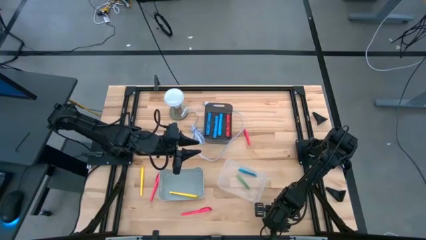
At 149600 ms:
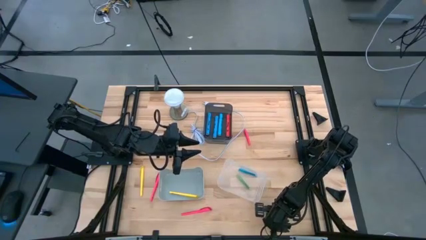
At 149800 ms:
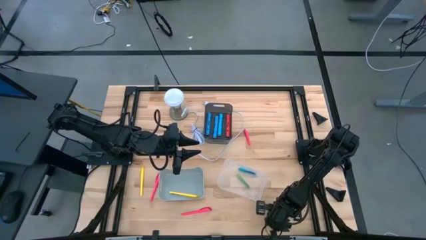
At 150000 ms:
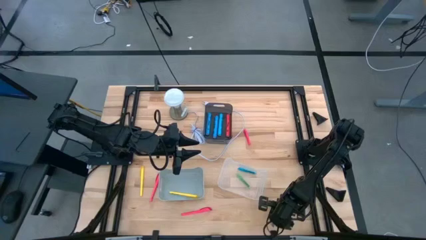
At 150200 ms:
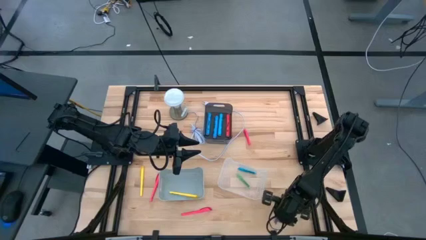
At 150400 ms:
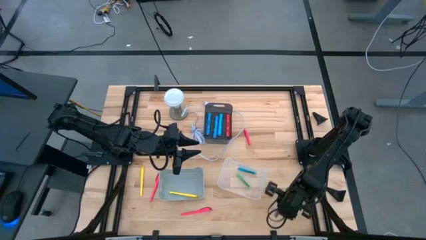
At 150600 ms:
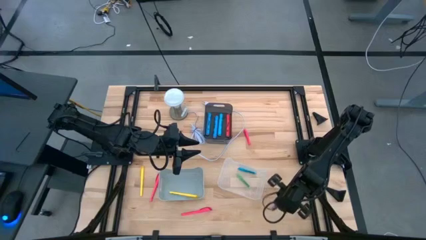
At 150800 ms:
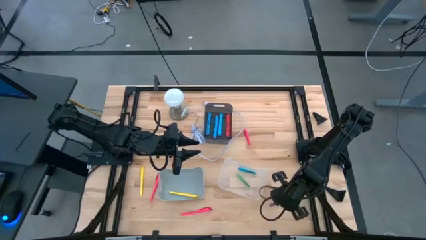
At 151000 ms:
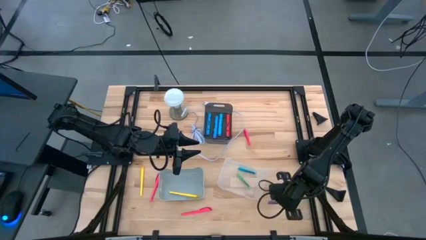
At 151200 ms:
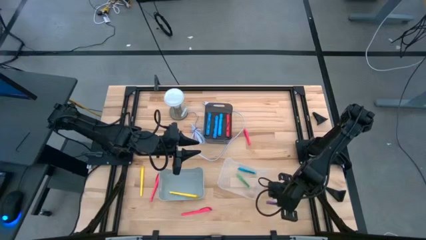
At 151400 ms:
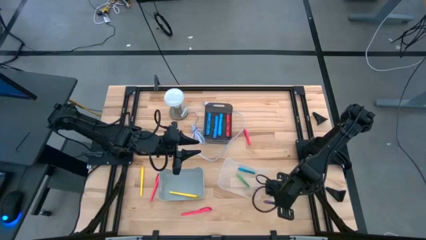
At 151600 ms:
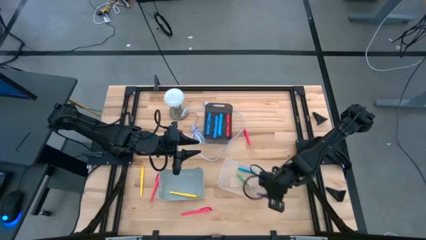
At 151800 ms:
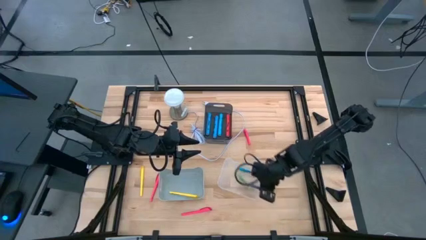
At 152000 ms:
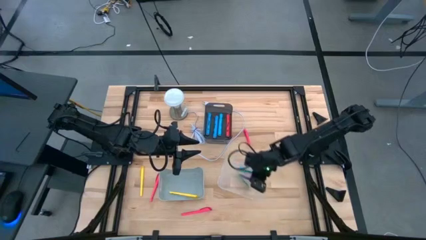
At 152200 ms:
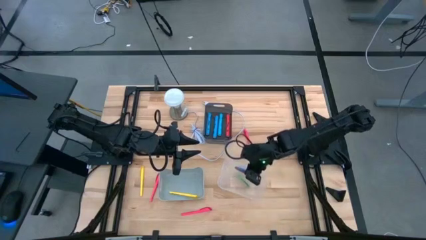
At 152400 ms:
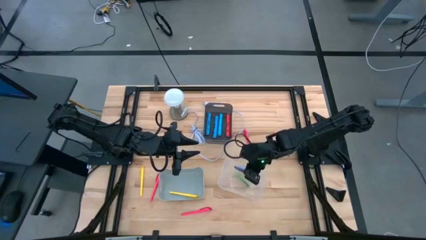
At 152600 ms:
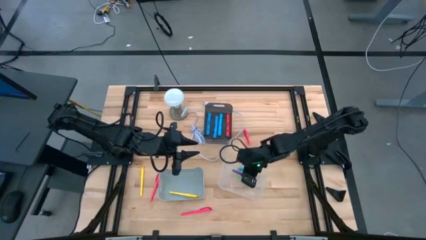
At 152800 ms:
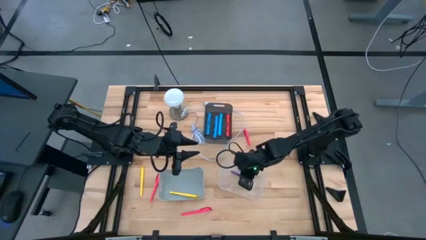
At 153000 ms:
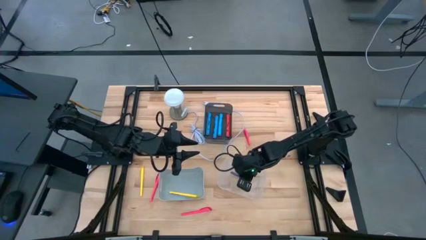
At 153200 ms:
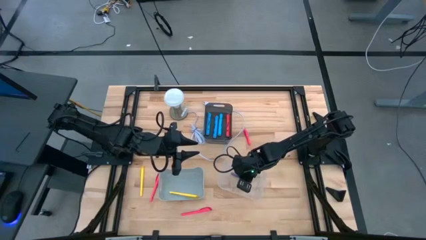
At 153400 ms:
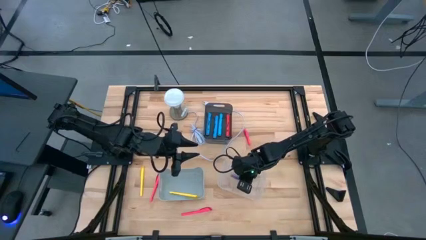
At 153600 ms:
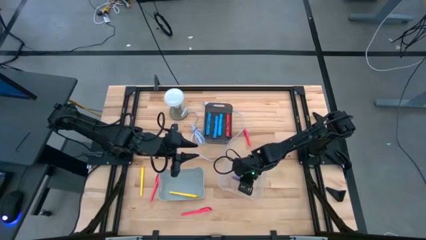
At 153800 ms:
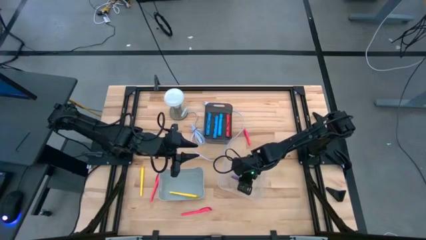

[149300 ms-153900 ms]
Task: Pick & Place Markers
Put the purple pen into the transparent bin

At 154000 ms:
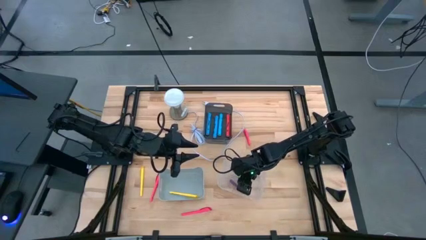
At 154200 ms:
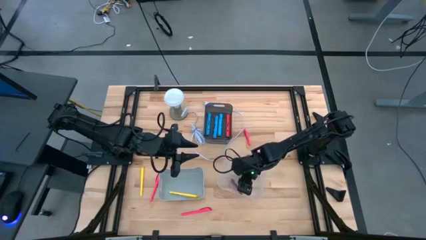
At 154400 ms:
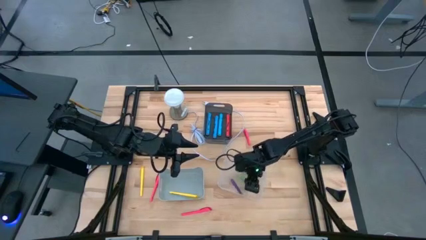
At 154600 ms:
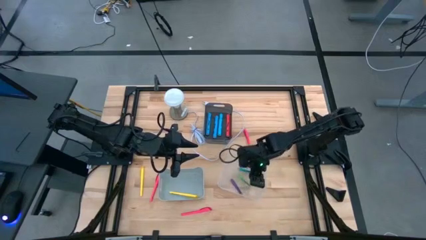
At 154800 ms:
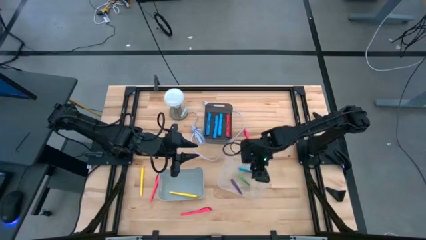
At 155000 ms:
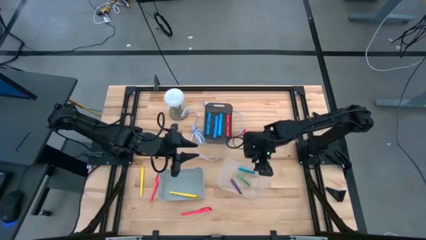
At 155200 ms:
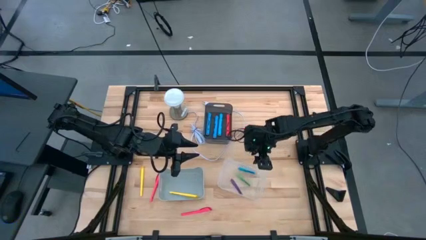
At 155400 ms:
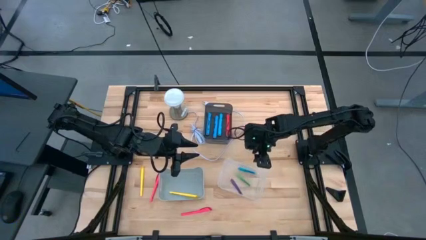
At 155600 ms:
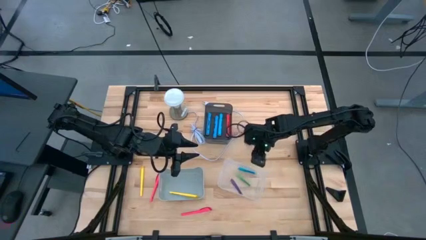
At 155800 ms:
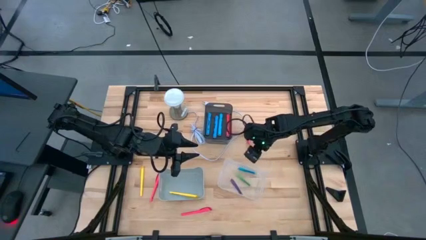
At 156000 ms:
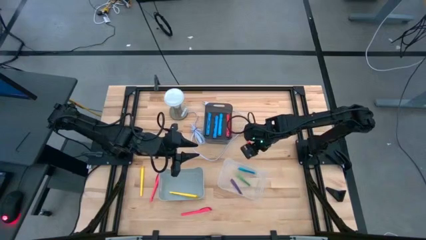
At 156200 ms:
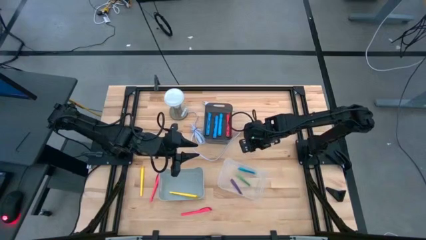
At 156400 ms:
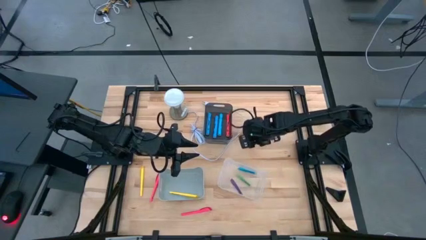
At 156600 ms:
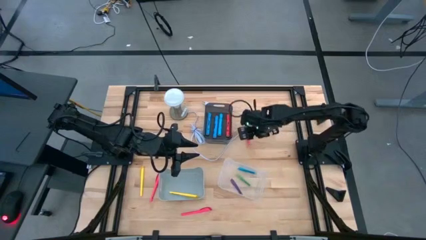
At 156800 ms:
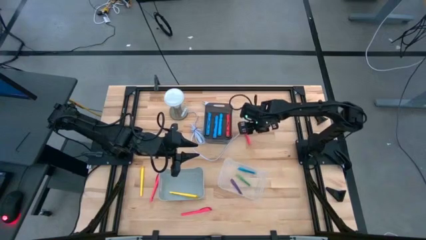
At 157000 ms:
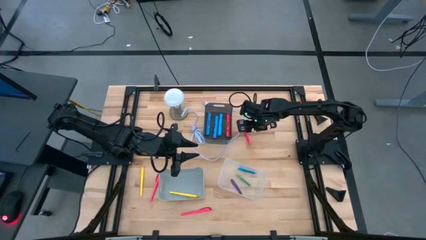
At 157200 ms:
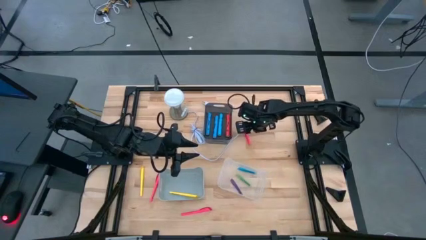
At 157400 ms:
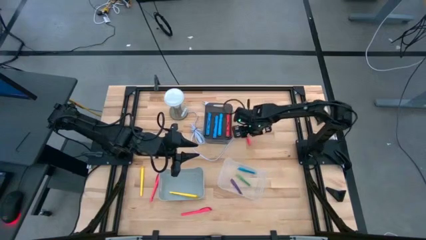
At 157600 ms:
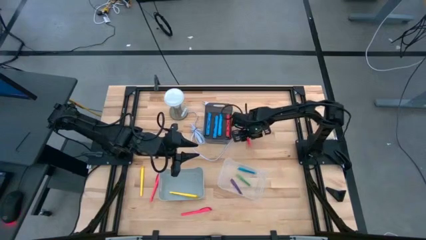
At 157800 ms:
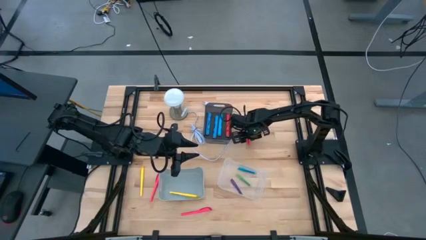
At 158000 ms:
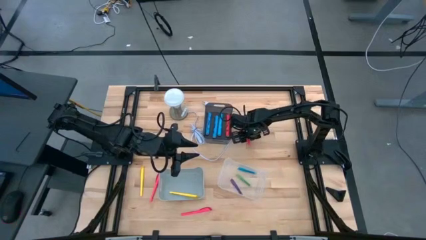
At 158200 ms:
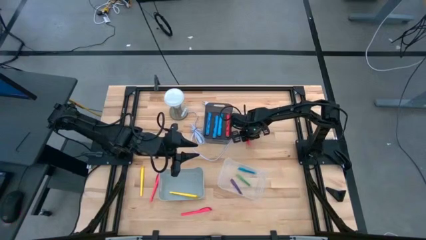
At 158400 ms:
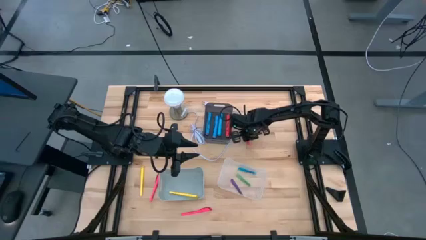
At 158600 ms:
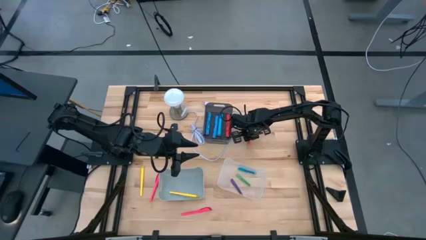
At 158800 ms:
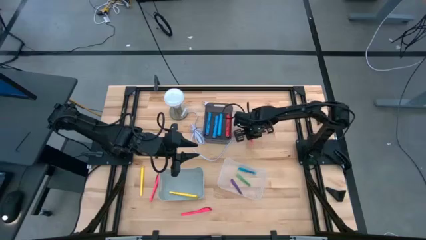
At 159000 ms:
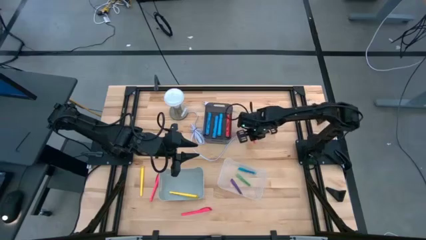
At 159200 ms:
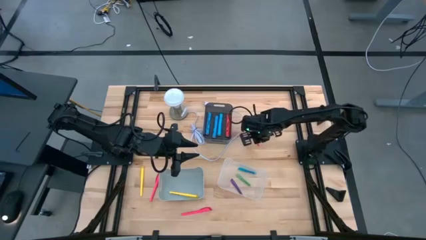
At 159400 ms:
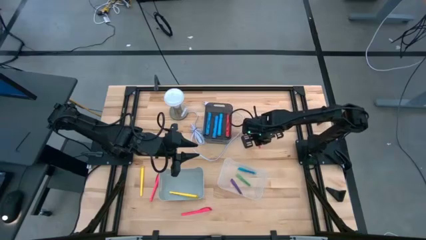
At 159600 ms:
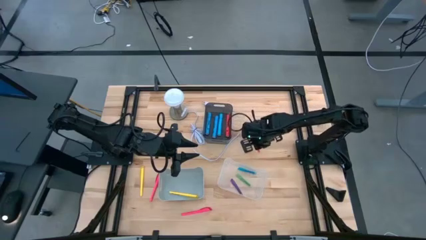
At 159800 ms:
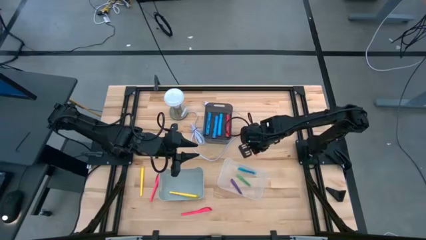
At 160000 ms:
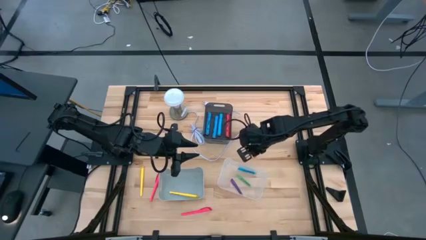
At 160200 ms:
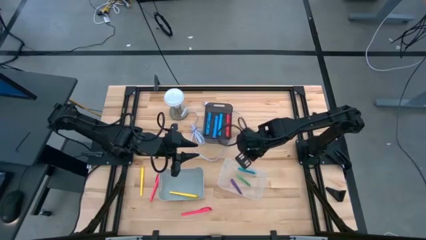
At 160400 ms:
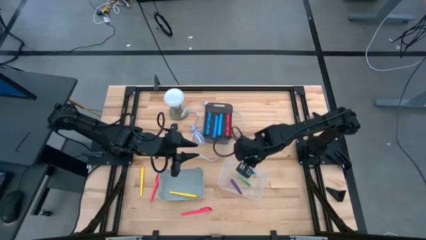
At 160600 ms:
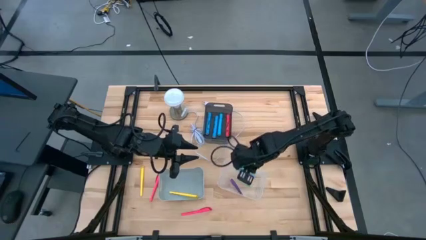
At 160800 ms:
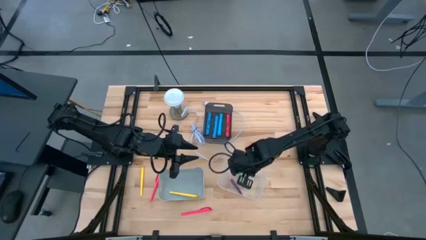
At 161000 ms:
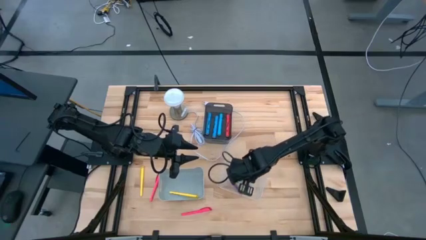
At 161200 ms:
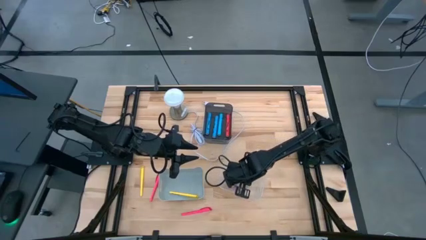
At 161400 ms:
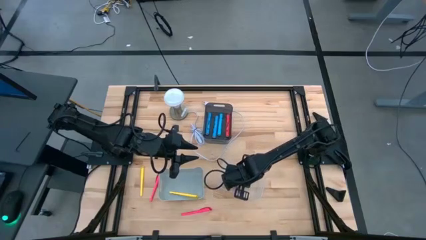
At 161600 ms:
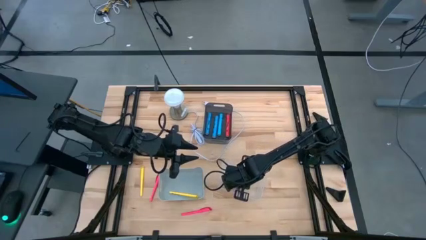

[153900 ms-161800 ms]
Put the pink pen into the transparent bin

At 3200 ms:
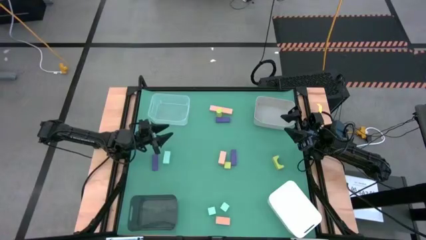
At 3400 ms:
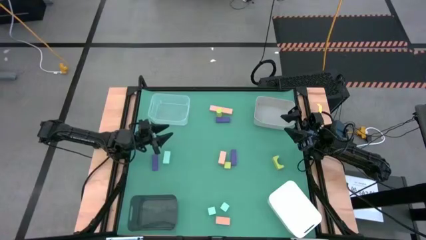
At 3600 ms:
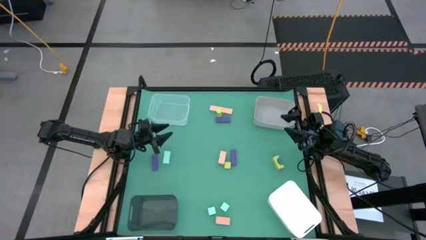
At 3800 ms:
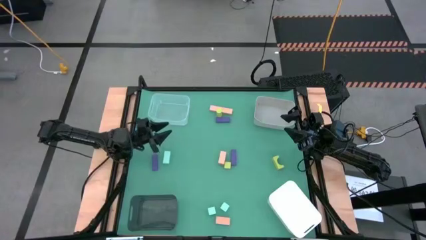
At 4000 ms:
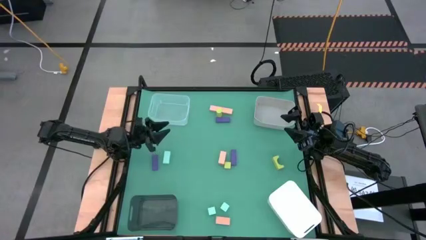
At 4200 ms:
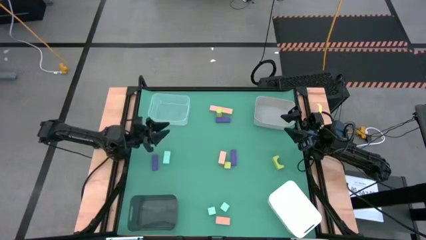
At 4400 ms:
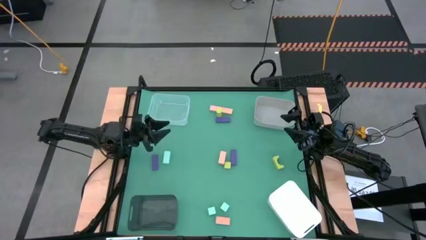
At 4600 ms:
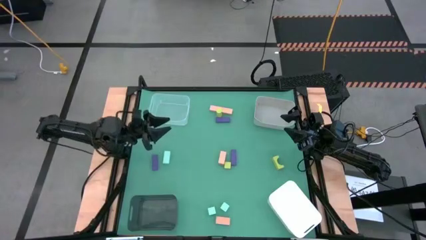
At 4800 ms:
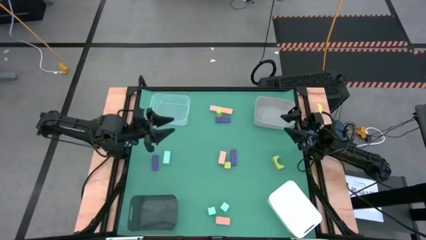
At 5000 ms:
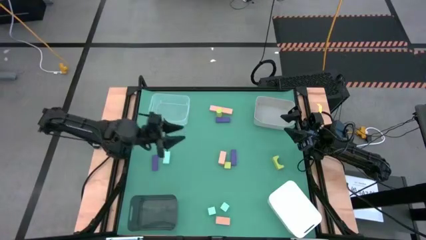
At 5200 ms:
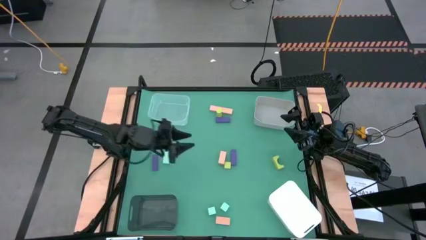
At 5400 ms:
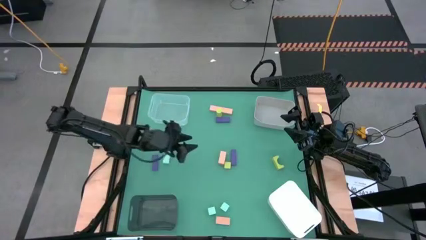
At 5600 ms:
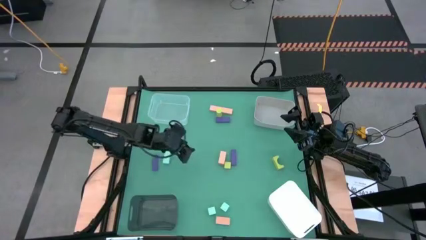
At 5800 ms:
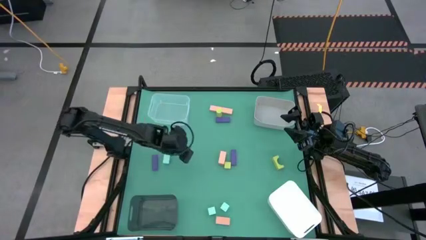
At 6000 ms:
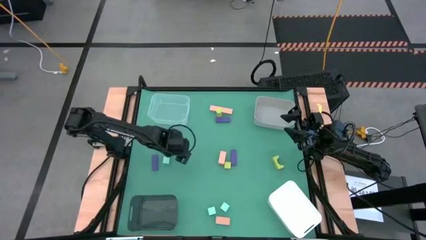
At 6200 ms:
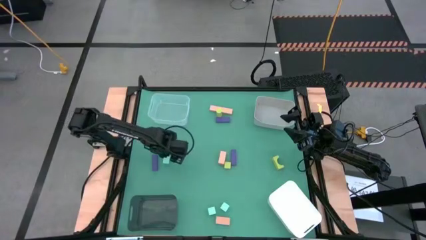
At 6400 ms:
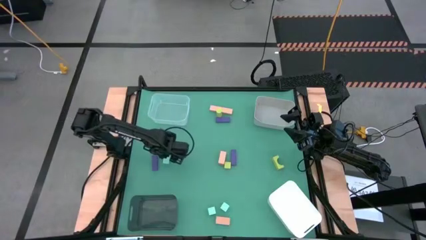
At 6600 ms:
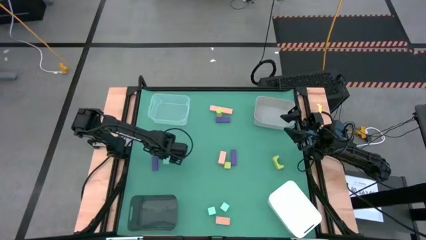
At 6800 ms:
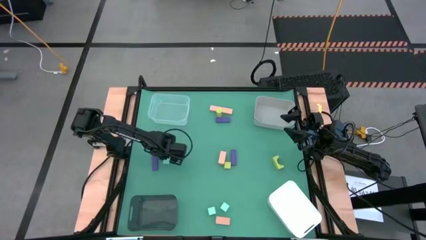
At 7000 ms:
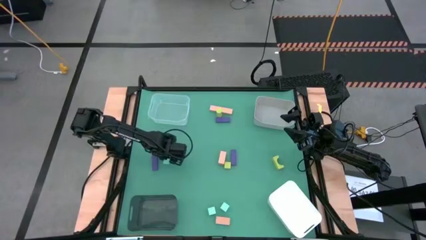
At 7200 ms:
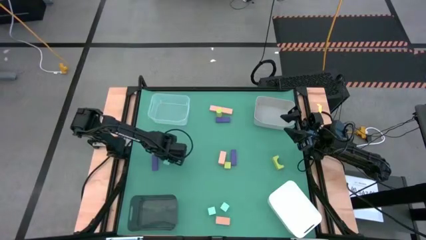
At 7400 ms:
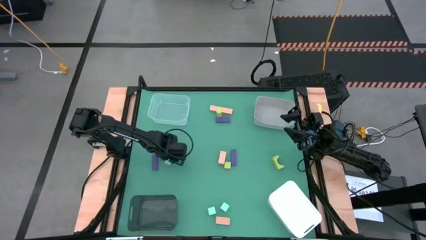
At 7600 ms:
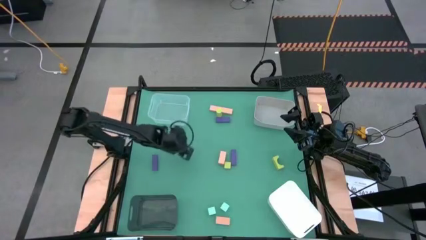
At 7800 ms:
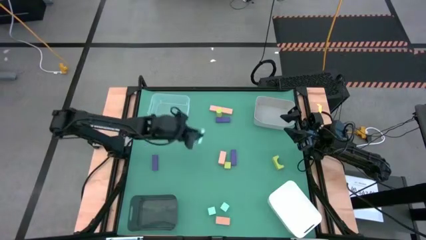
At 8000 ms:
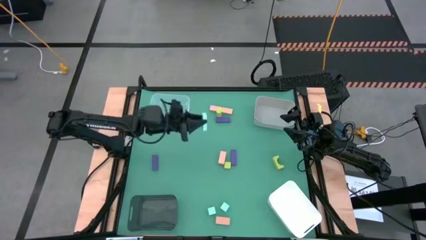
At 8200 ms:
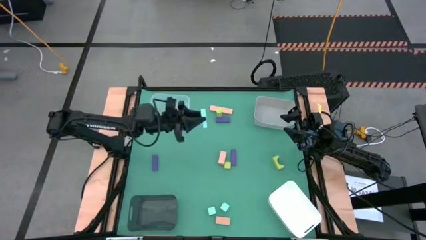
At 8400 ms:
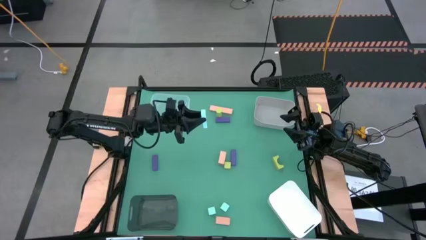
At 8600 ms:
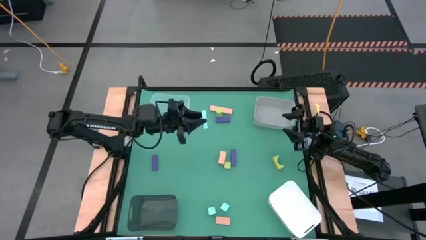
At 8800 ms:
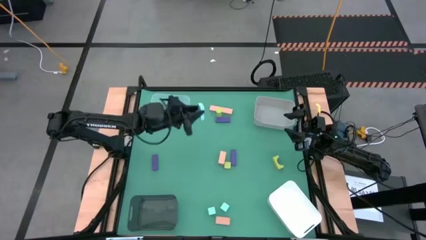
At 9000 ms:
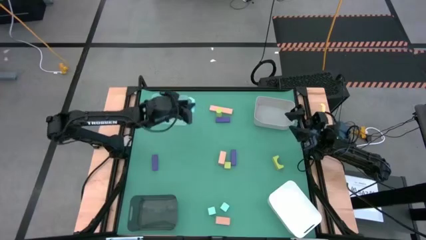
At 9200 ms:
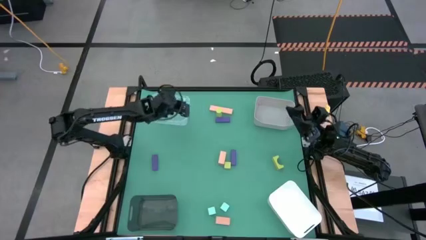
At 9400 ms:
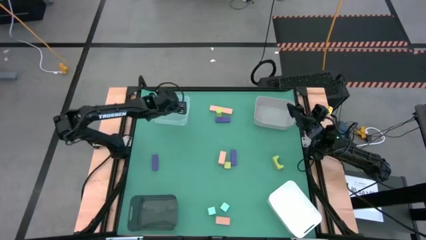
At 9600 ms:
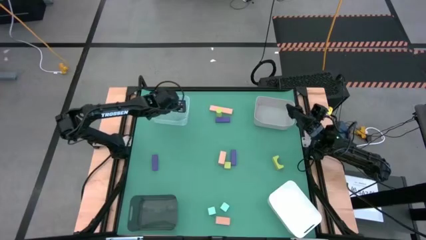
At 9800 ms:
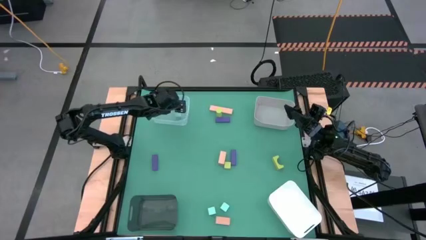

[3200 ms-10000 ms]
Task: Sort & place blocks by color
Put the top light blue block into the transparent bin
